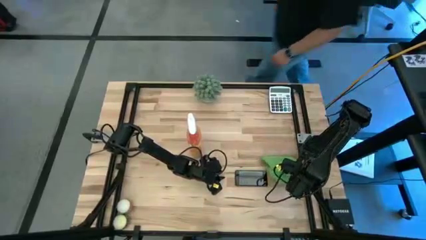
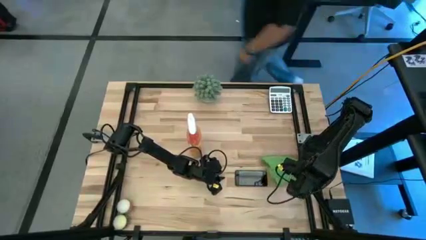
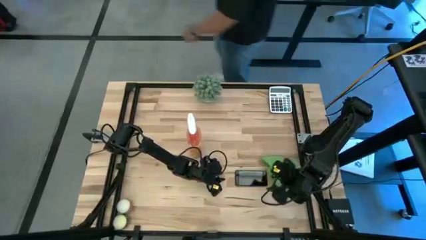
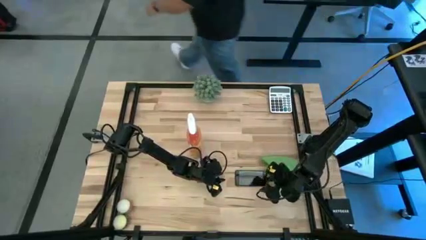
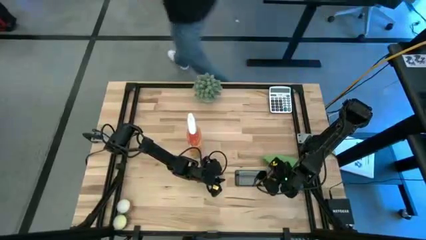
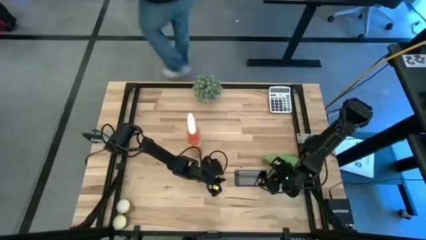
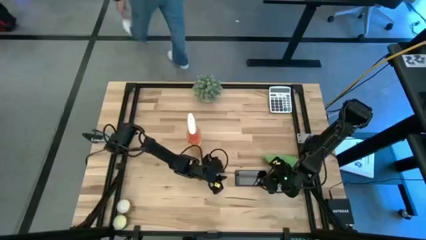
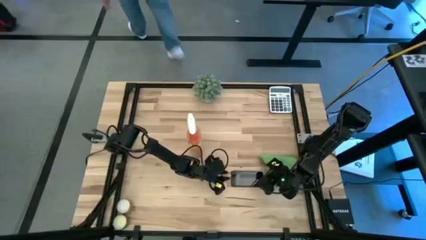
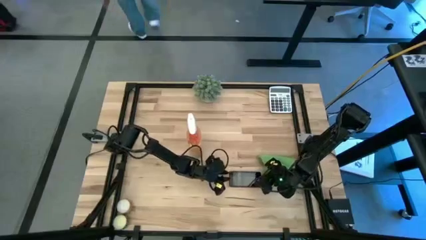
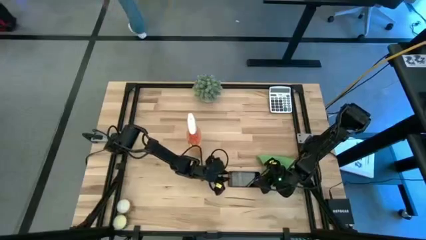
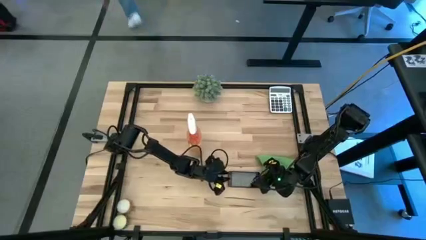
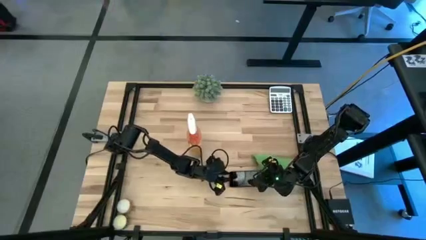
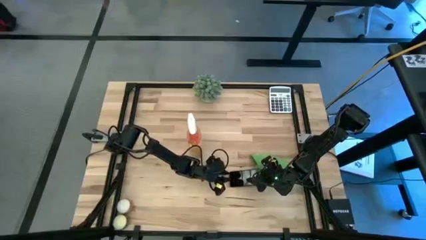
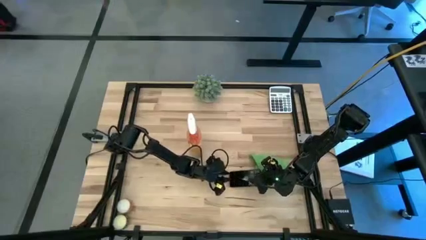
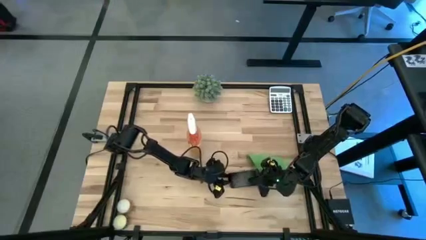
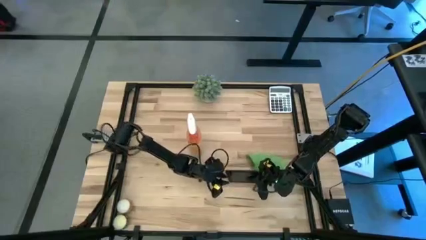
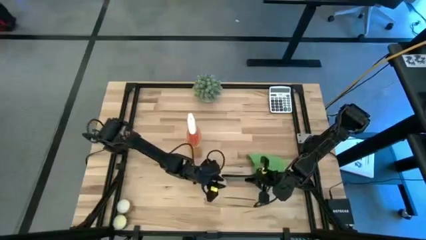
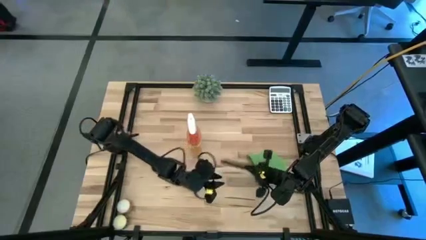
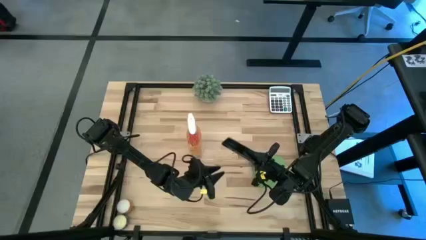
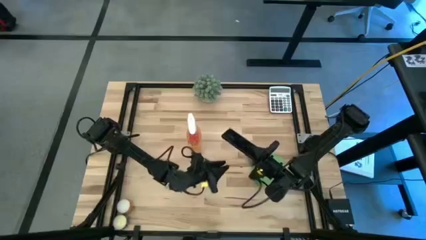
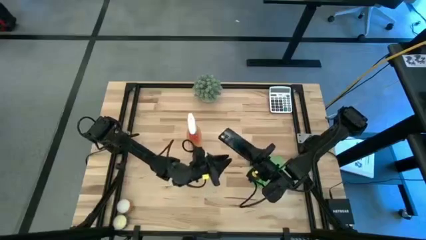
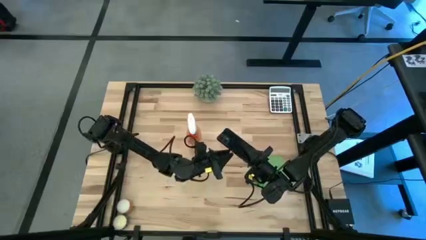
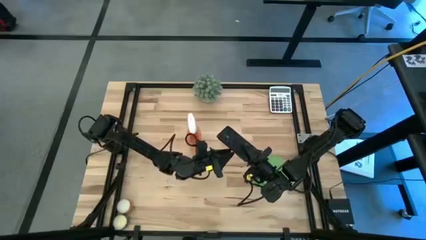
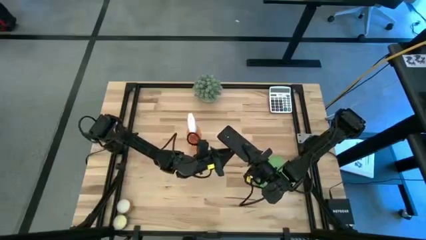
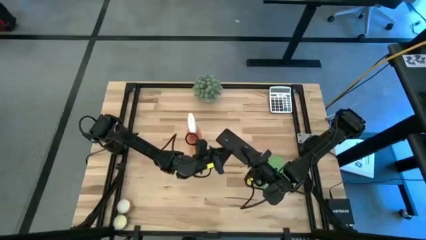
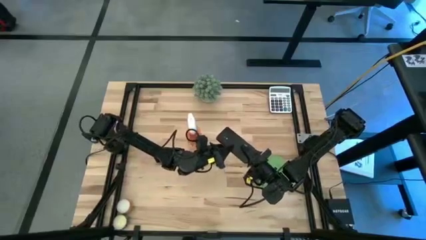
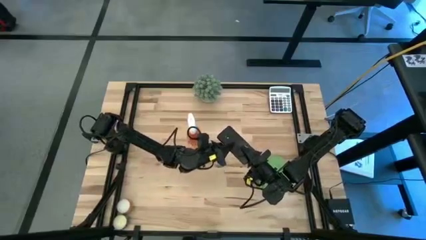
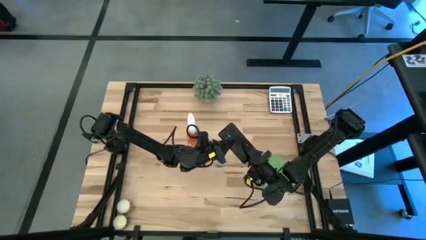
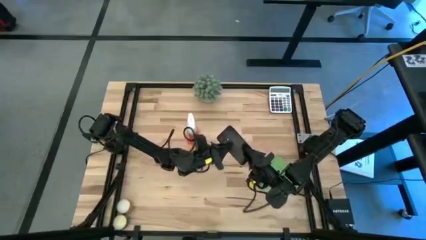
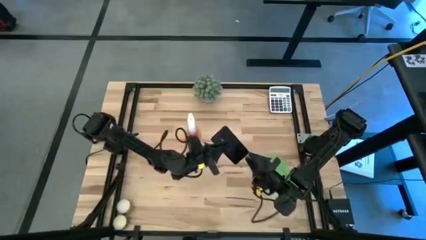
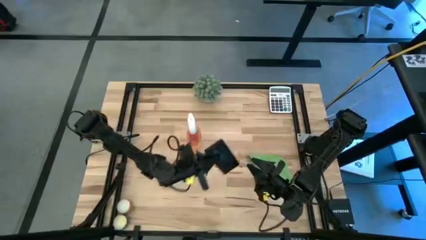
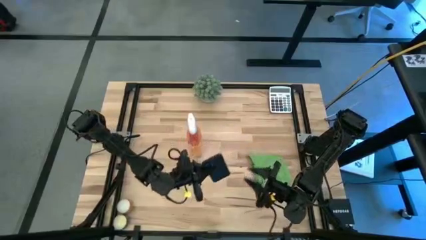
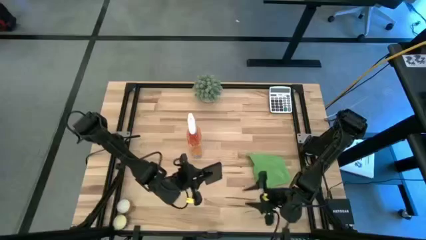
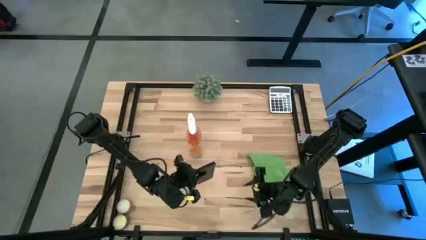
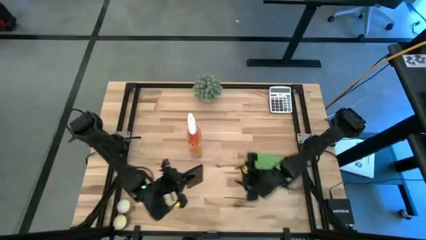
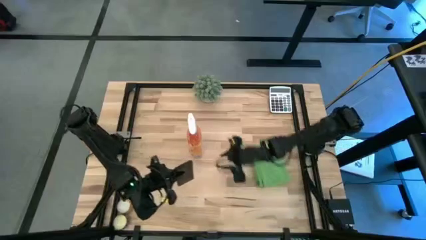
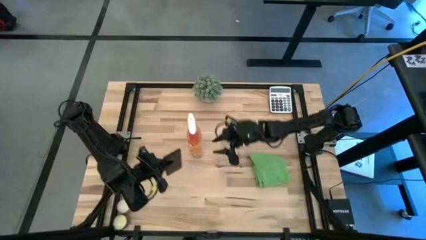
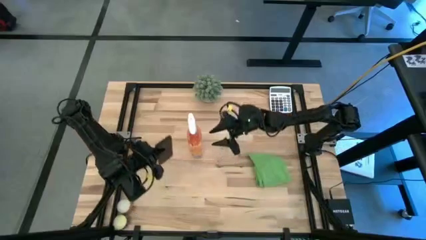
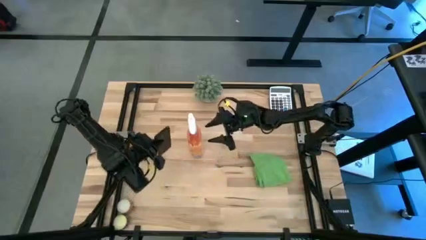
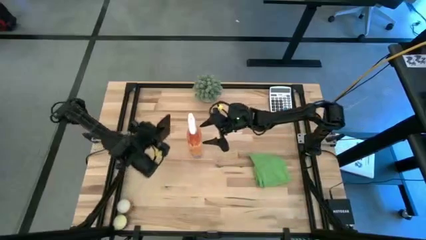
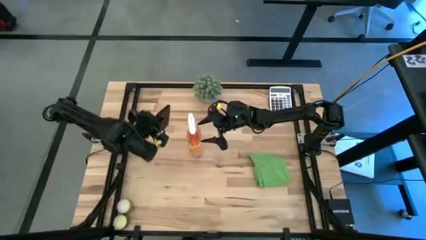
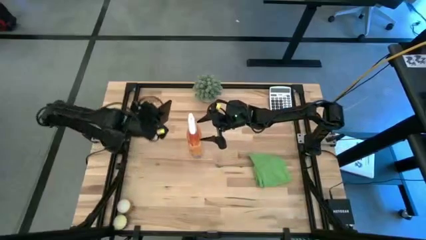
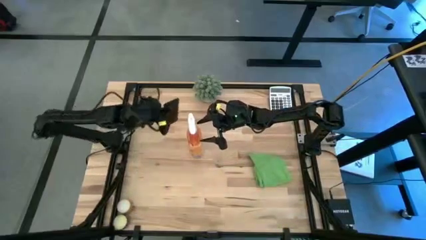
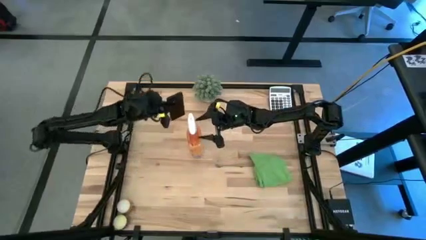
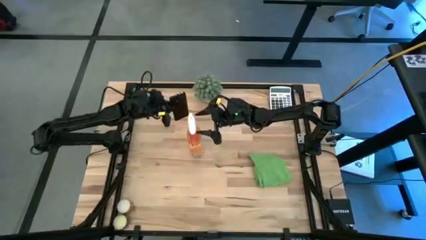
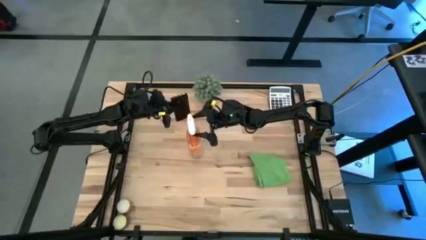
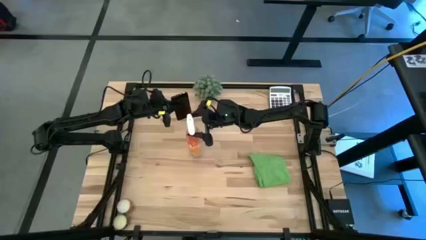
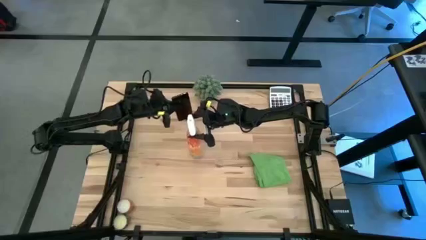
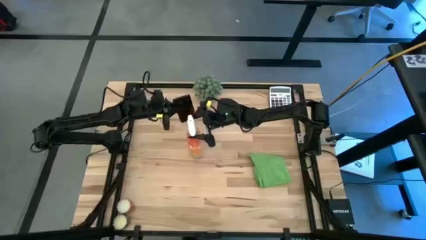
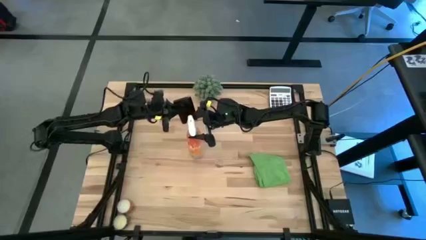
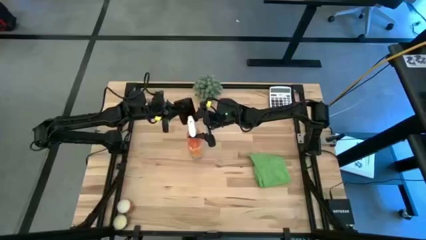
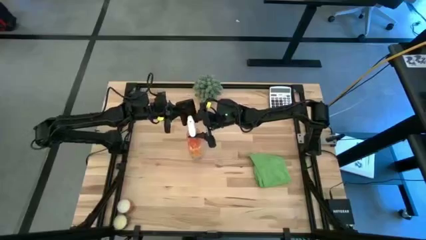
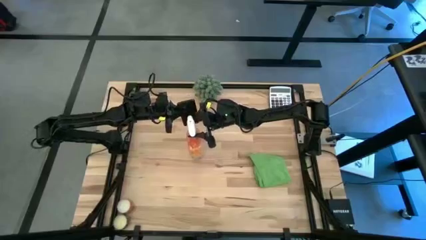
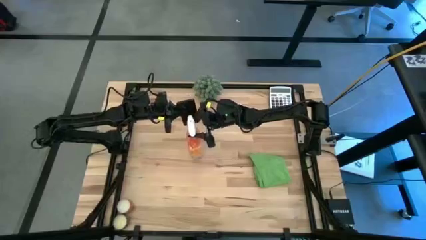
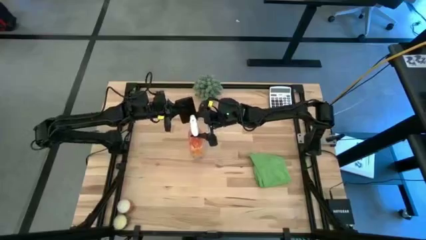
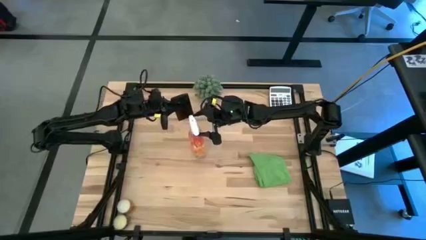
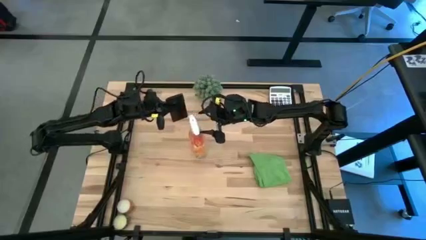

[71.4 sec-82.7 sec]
Task: Apply microfiber cloth
Spray the back of the black cellphone using the orange spray cleaning bottle
